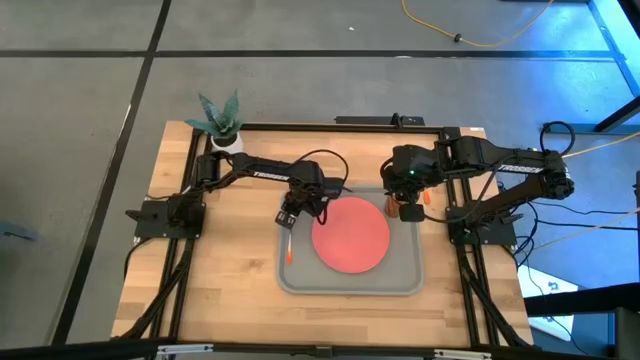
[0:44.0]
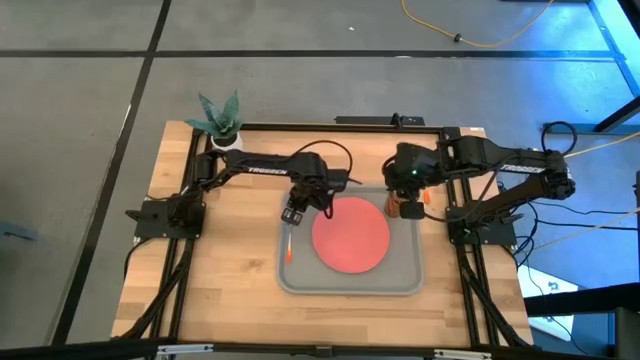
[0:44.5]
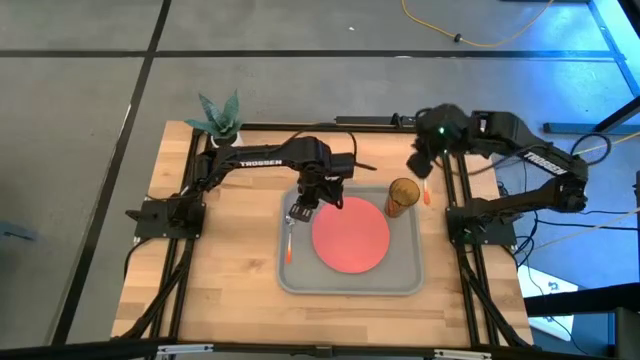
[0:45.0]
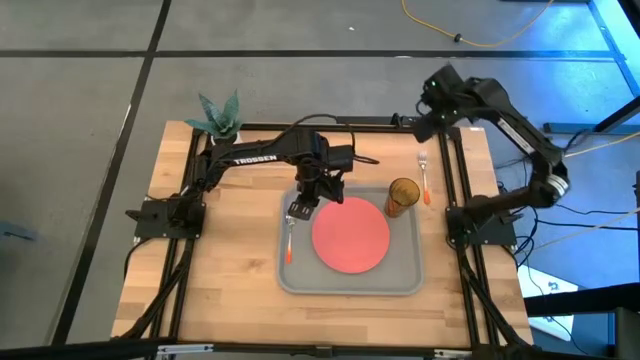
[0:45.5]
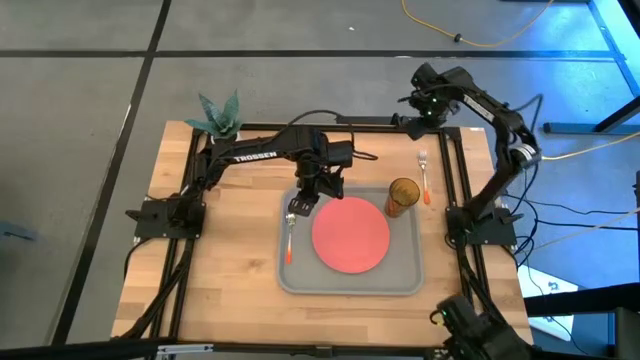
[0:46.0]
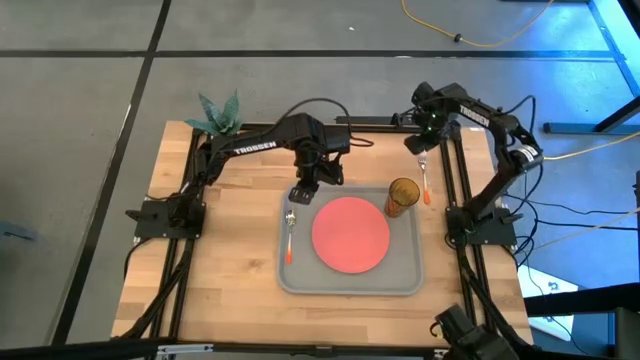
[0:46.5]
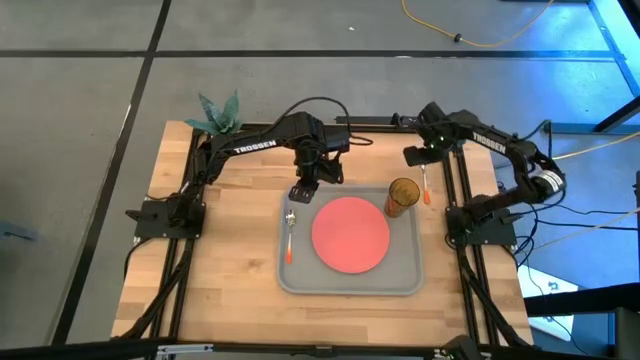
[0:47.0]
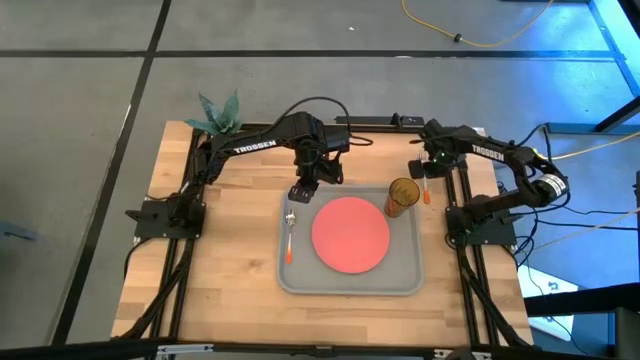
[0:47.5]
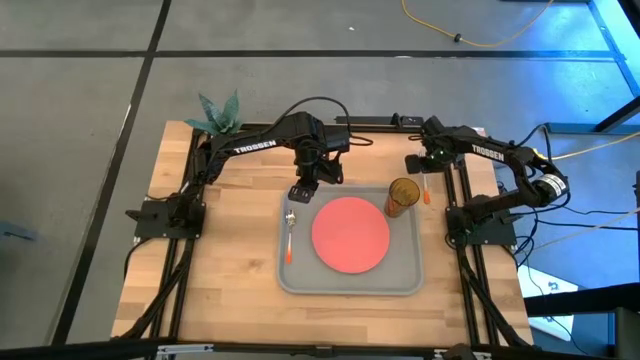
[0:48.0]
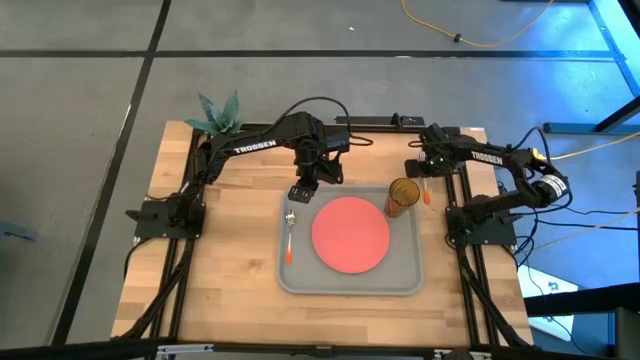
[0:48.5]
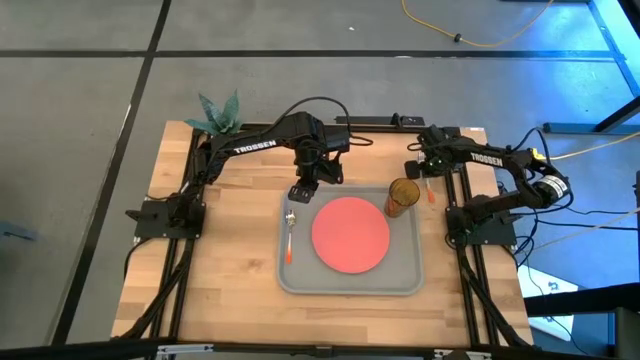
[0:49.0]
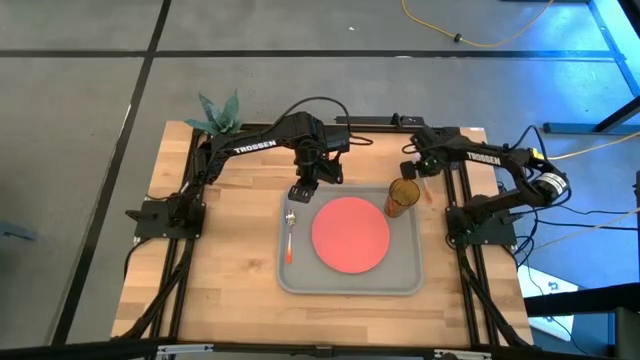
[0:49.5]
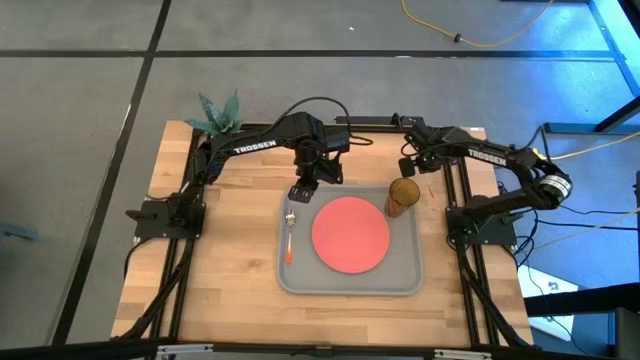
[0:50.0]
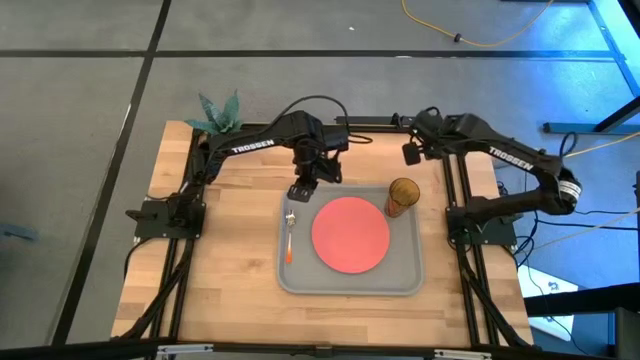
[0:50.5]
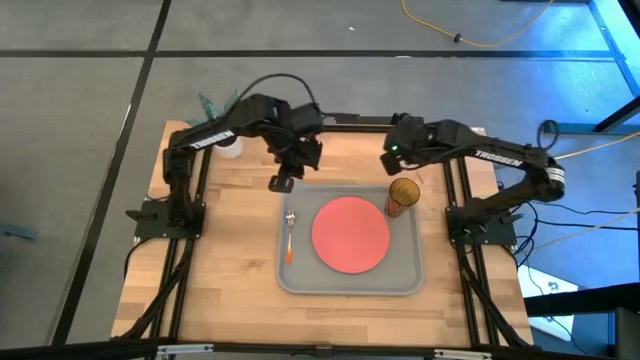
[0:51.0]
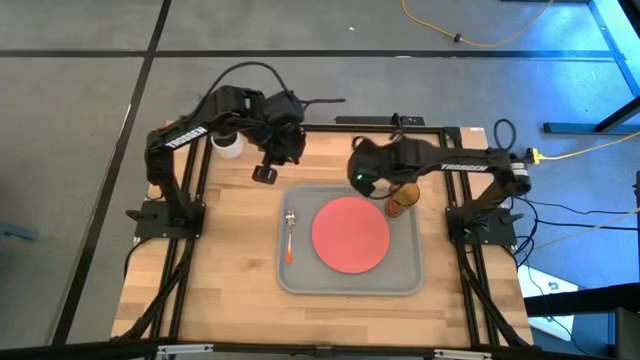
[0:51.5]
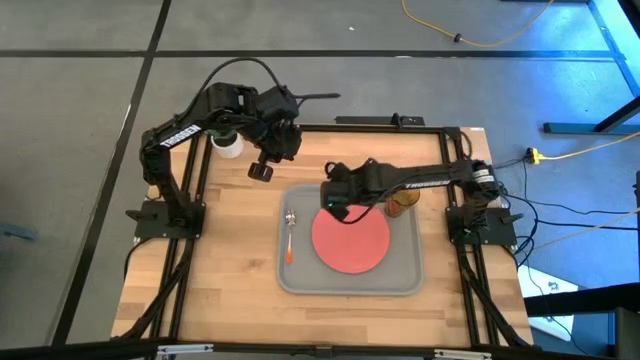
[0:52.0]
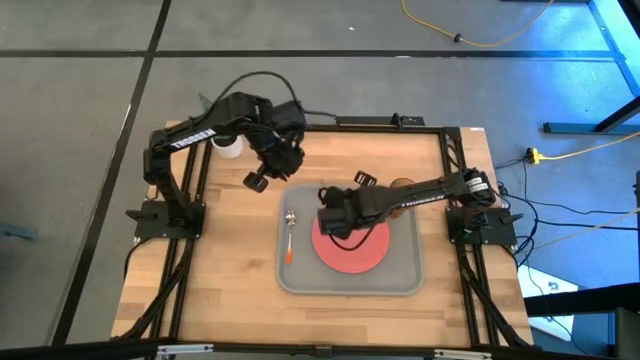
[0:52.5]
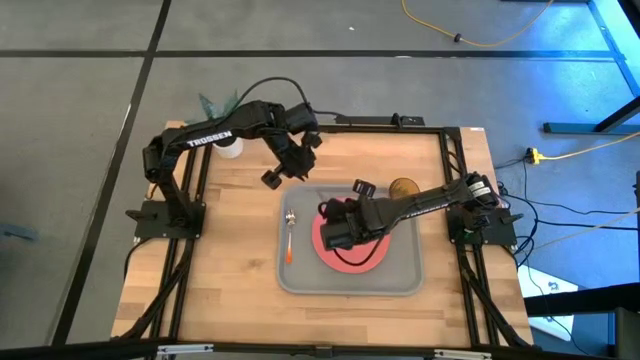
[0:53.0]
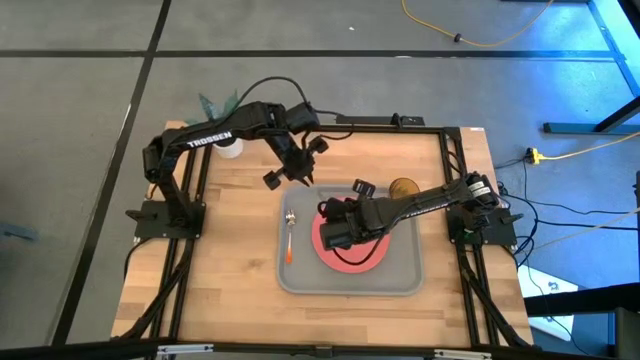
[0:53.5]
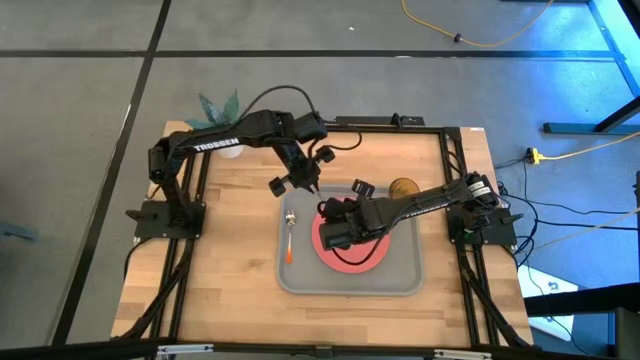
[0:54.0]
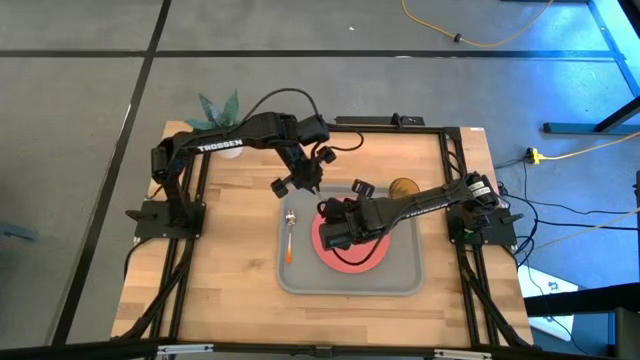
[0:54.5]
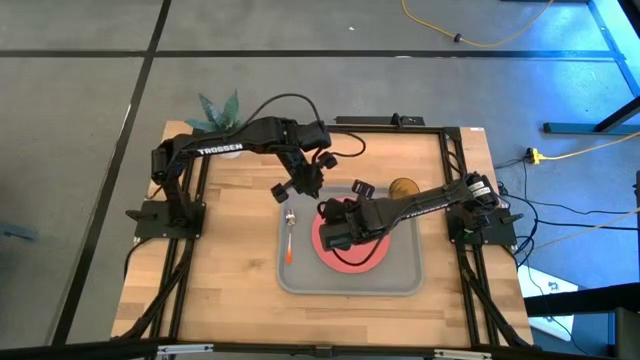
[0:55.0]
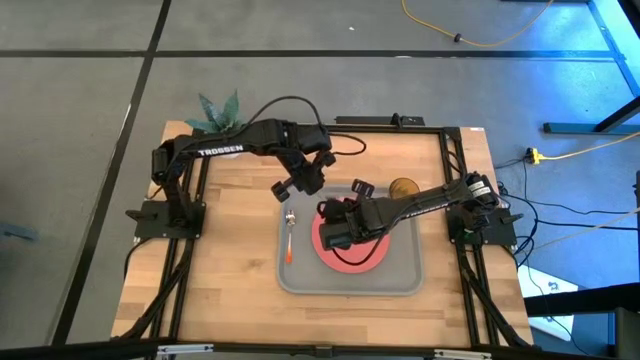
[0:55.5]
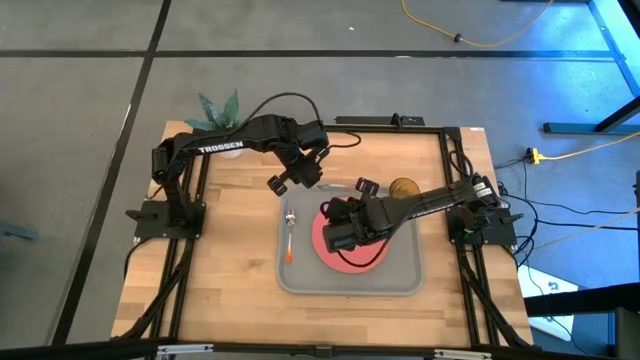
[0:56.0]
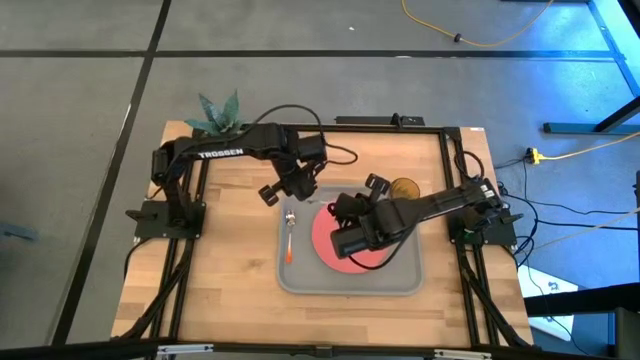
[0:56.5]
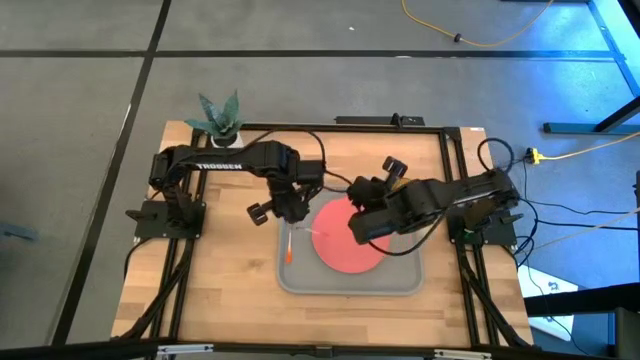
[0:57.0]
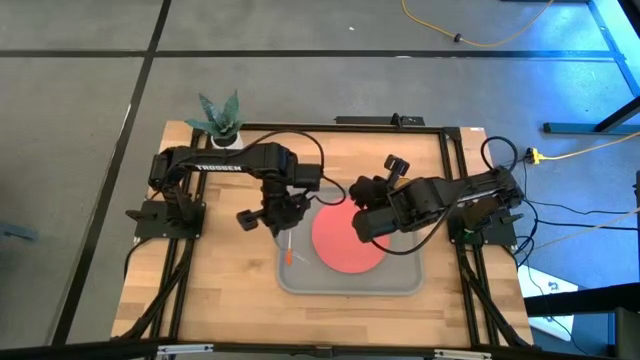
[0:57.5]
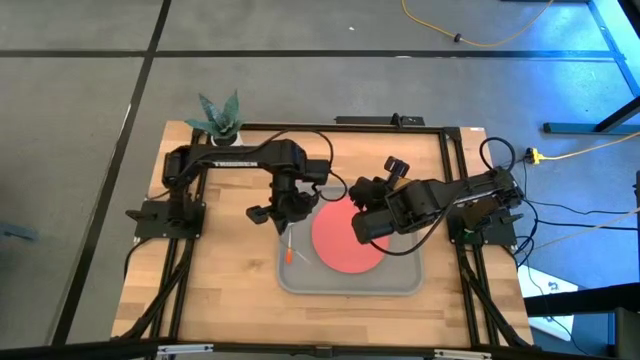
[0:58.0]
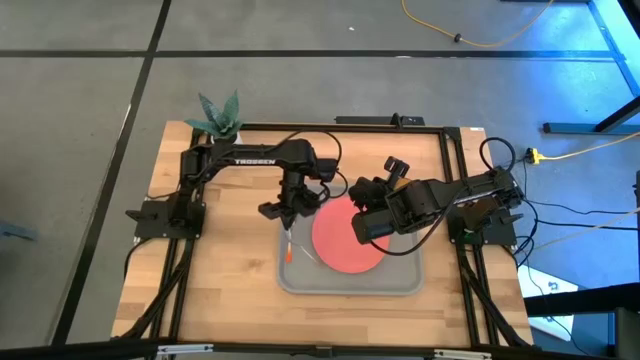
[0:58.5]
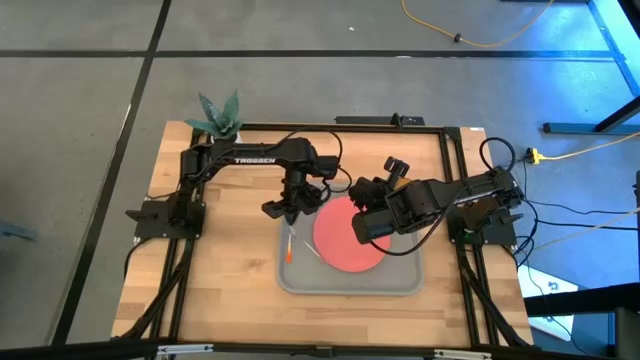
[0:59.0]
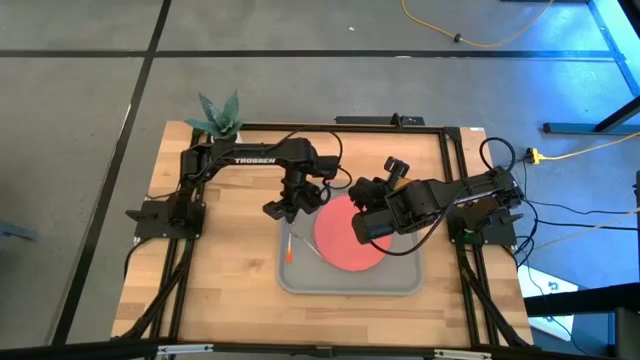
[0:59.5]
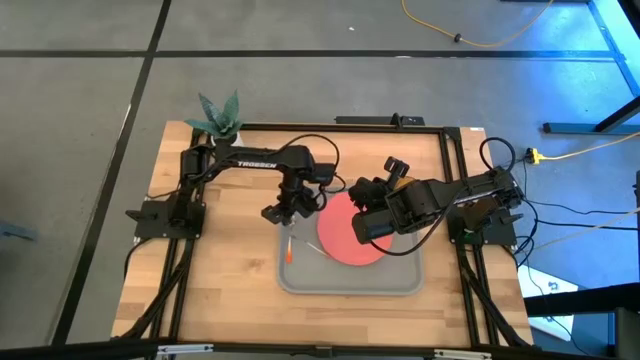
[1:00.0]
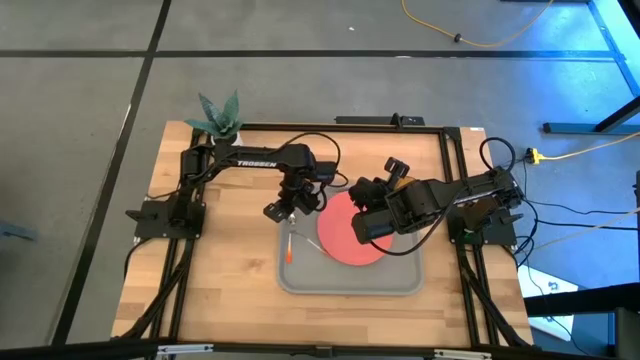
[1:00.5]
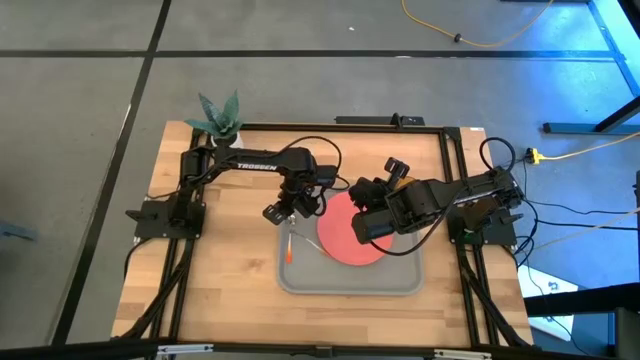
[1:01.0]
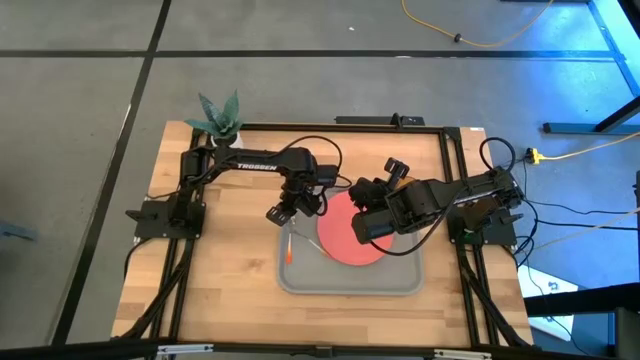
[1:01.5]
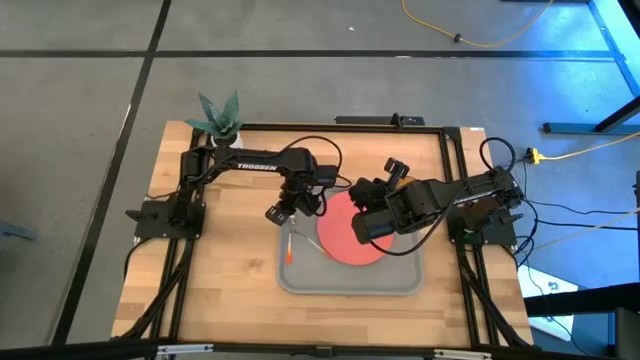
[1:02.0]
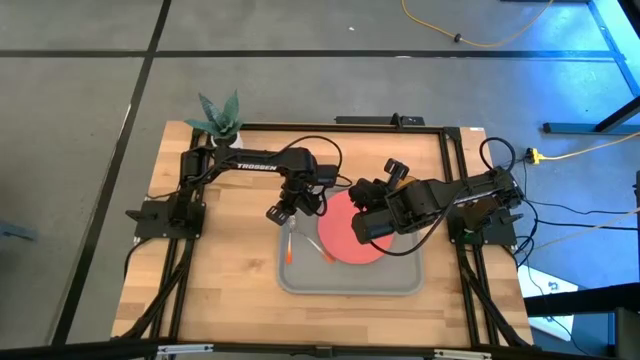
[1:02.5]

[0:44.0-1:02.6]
Task: Pick and place plate/cup/fork/spoon on tray
Put the fork in between the spoon and plate on the serving tray

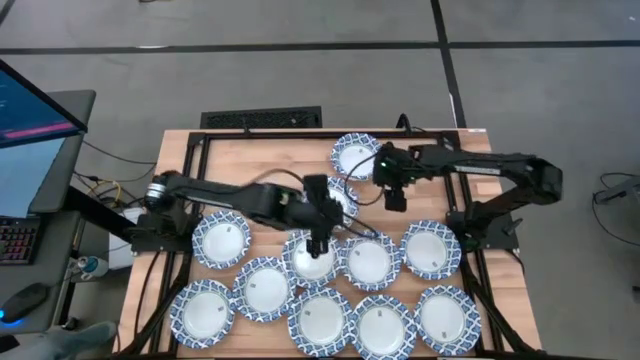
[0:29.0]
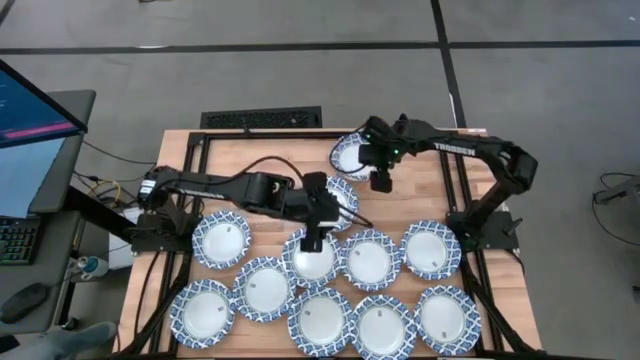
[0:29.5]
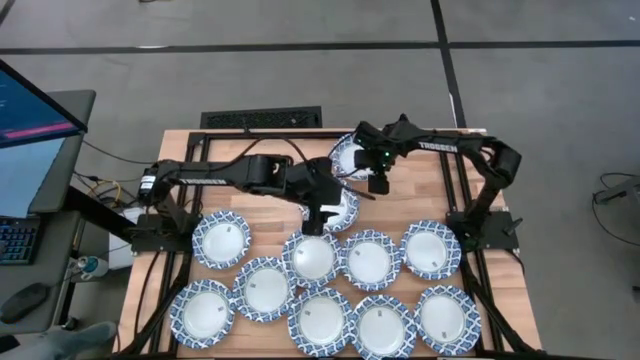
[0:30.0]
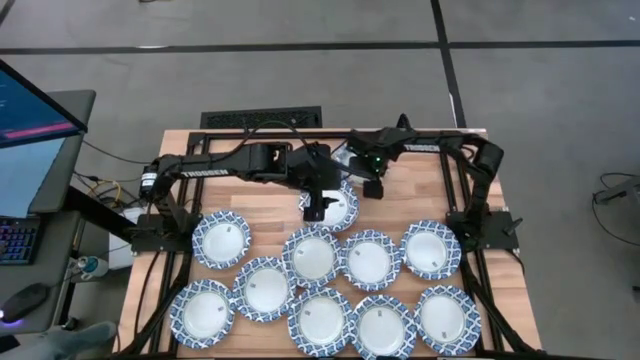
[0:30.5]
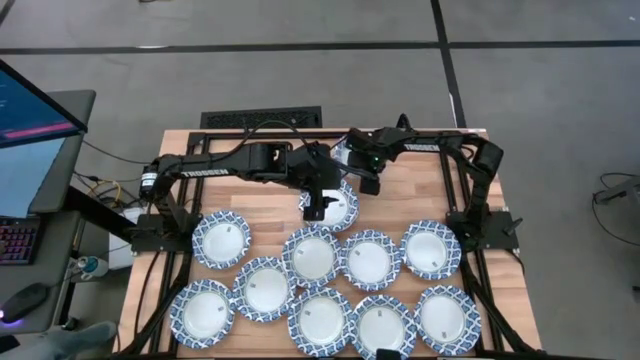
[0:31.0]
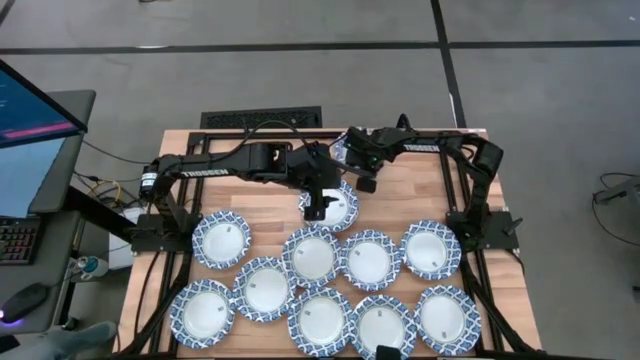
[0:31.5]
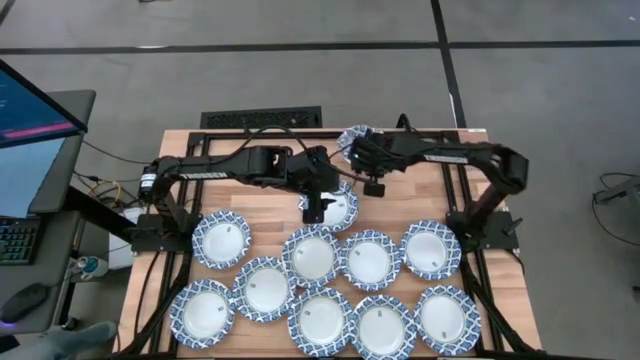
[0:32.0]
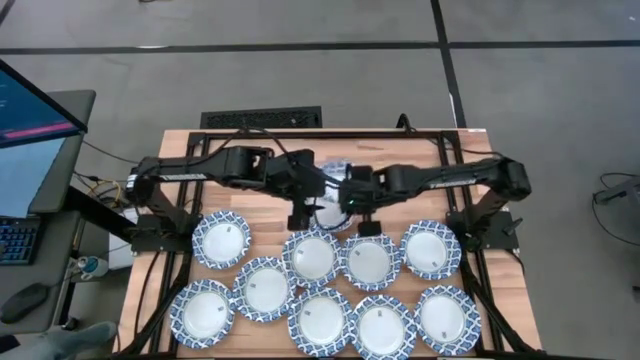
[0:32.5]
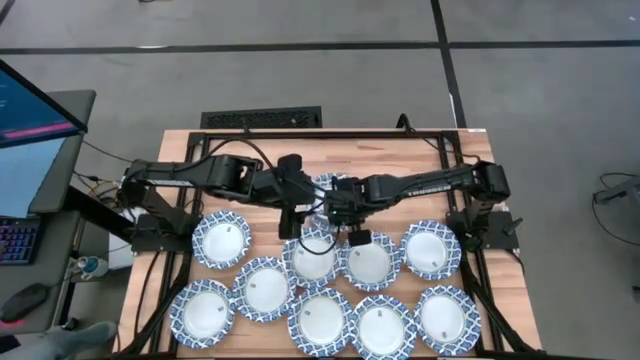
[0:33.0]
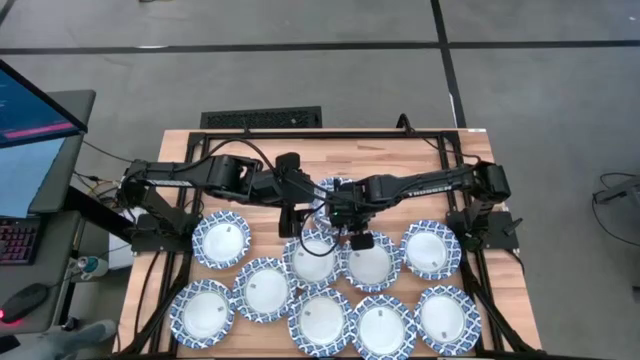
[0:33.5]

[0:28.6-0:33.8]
Task: Nest bowls inside each other
Stack the white stacked bowls on the white stacked bowls
